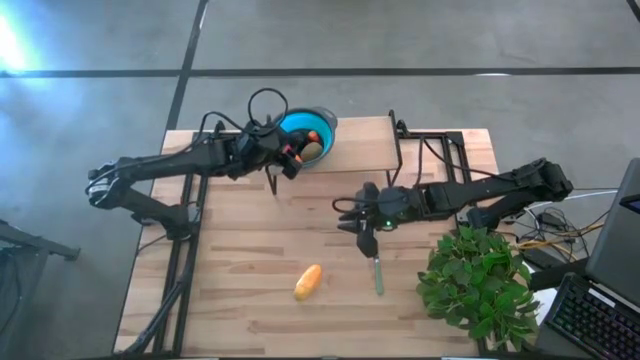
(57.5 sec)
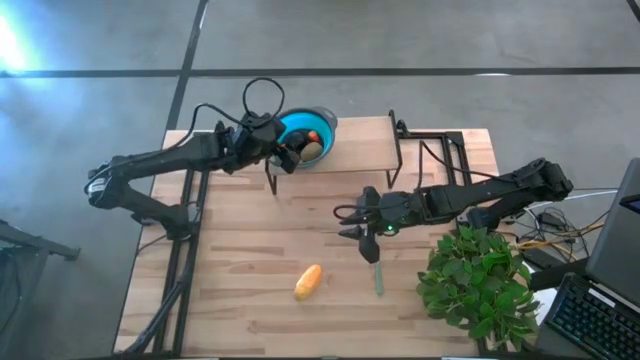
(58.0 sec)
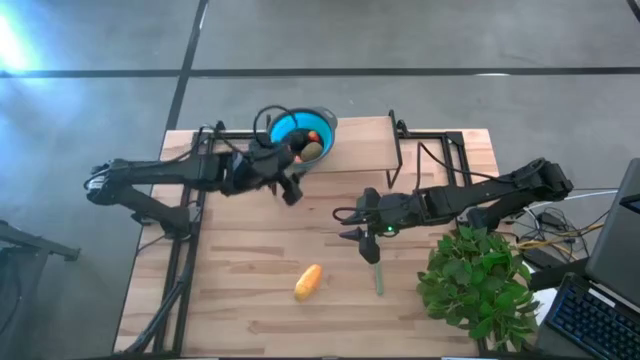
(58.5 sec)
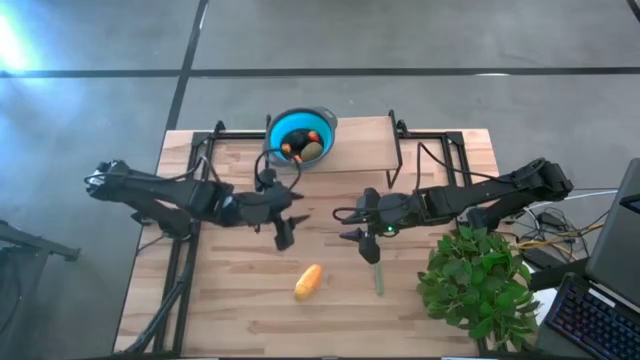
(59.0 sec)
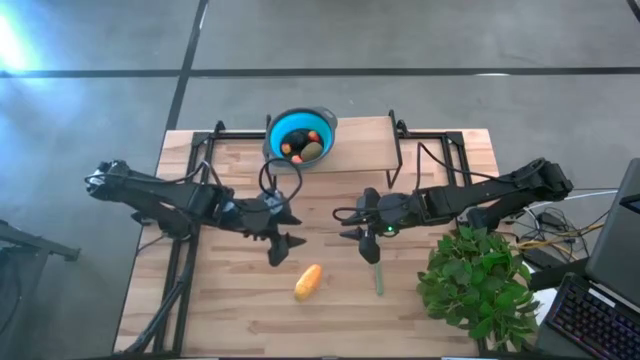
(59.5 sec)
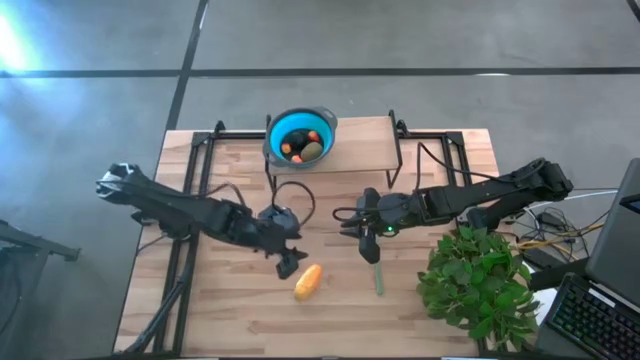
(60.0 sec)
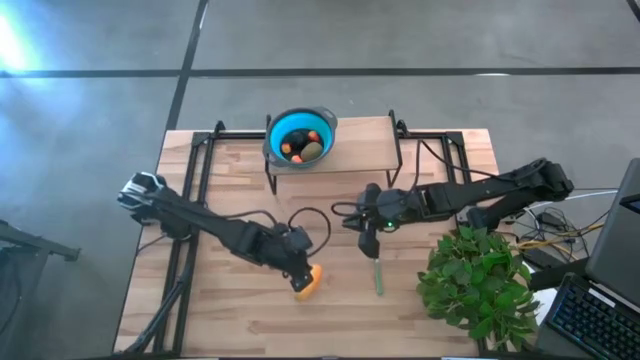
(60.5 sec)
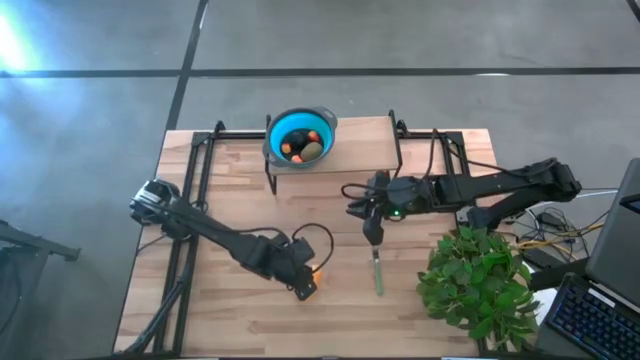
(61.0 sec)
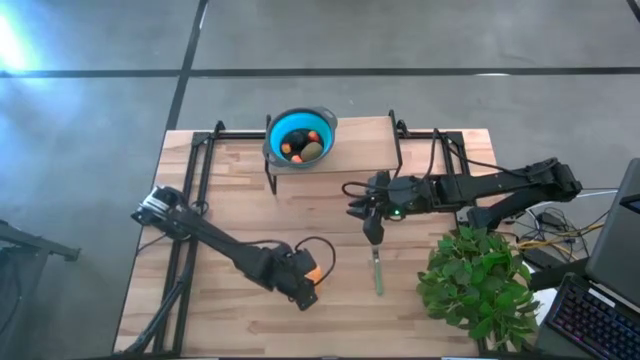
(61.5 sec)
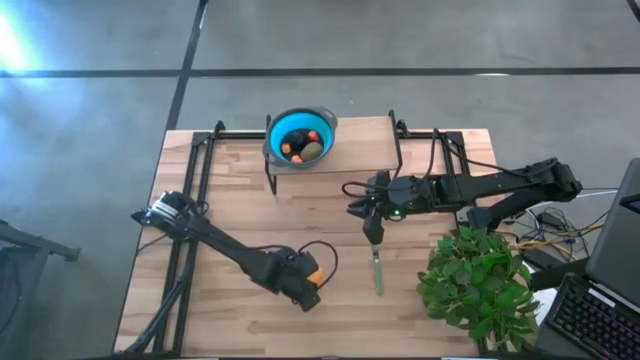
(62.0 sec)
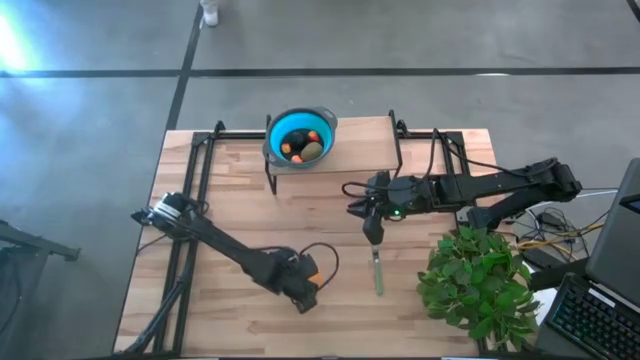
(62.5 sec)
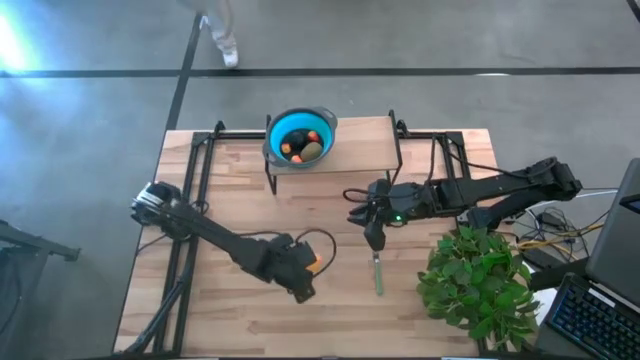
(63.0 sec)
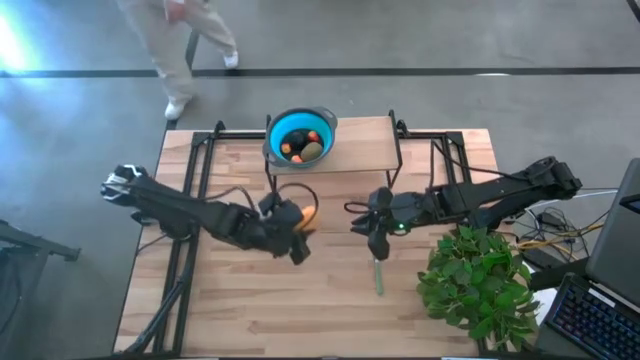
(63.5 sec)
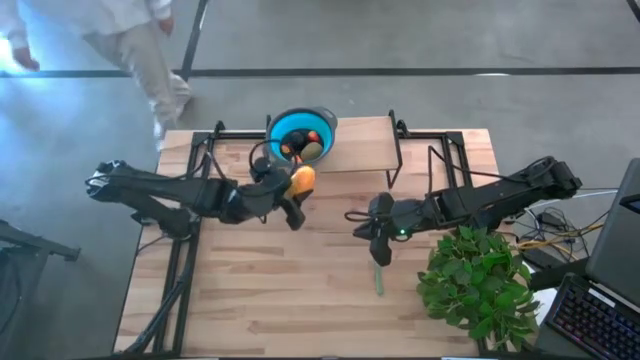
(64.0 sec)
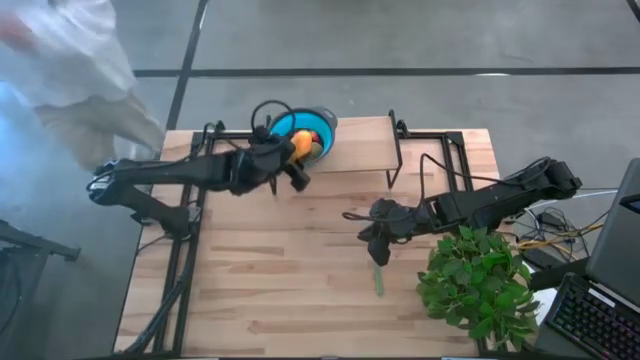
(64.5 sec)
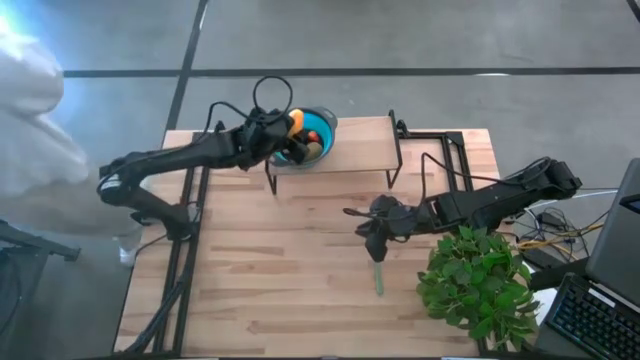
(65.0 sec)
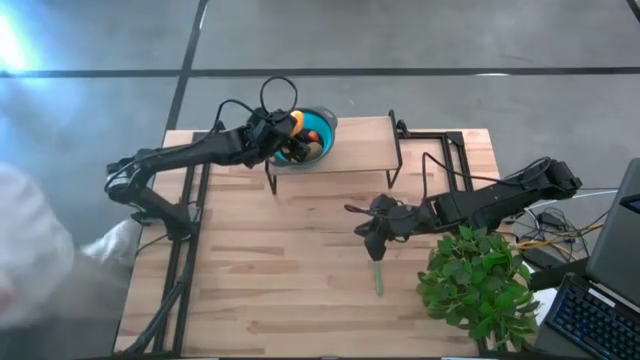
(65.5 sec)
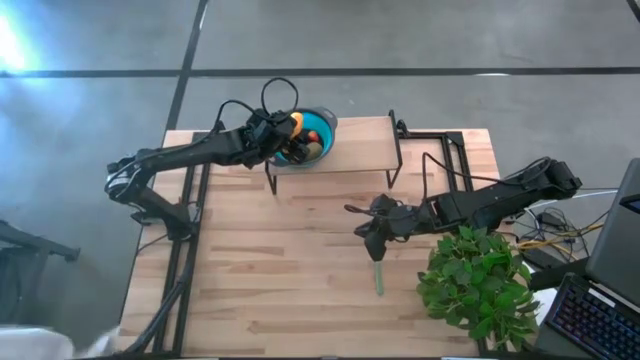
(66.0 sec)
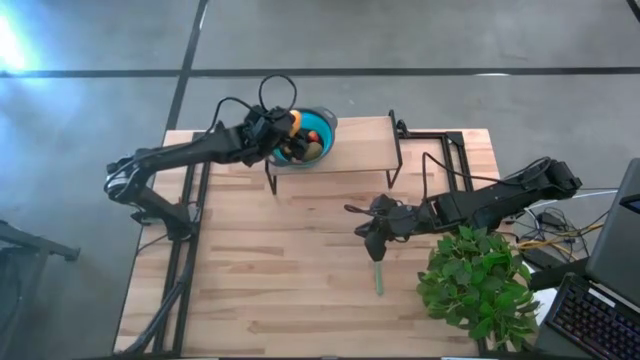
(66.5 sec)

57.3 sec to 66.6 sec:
Task: Pick & Place Fruit
Put the yellow mango in the blue strainer bowl on the shelf

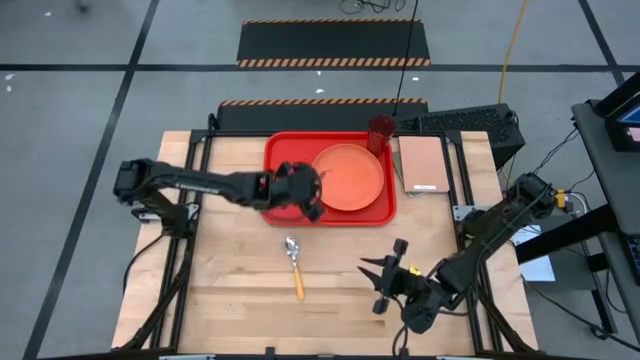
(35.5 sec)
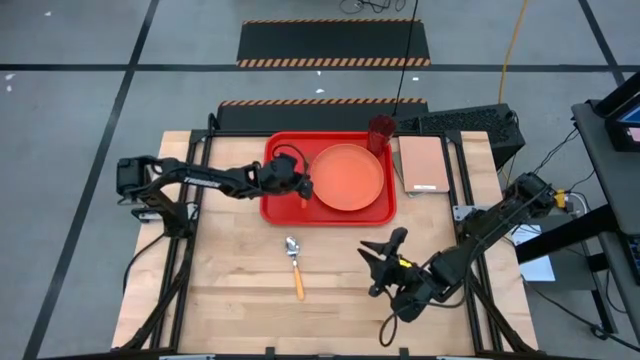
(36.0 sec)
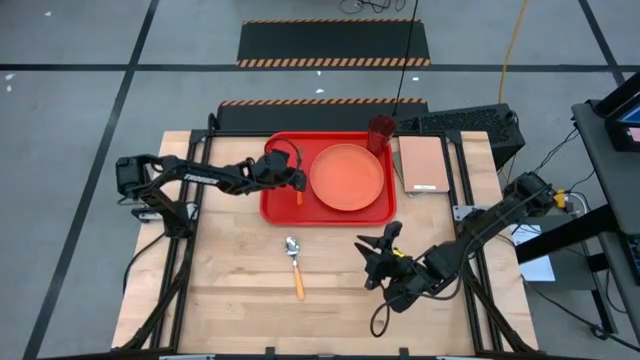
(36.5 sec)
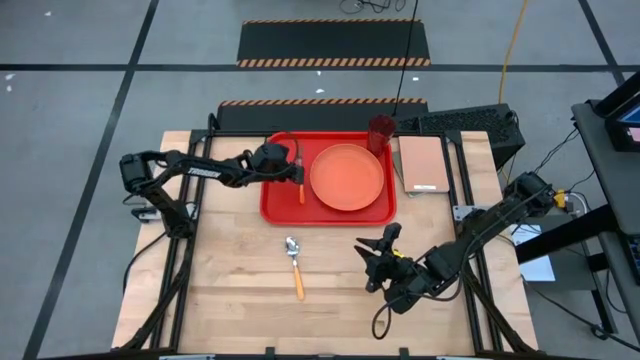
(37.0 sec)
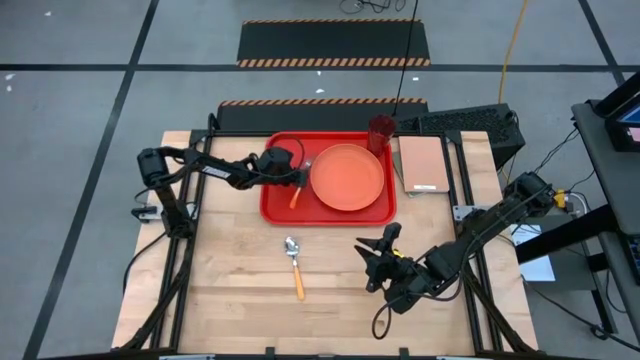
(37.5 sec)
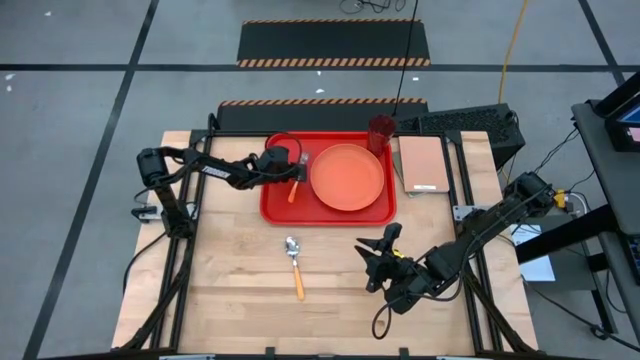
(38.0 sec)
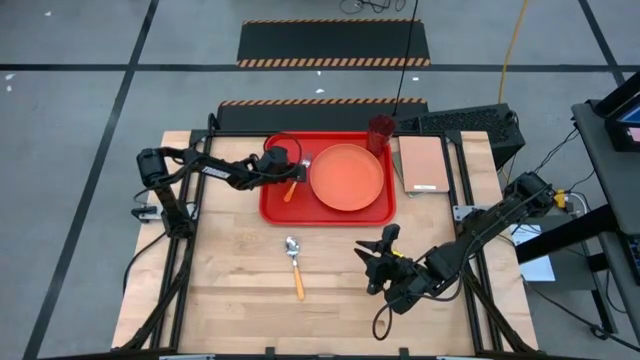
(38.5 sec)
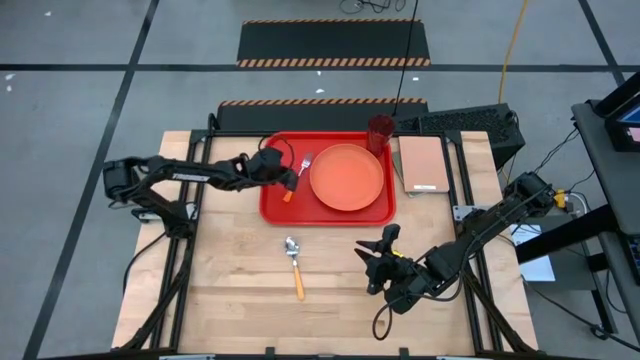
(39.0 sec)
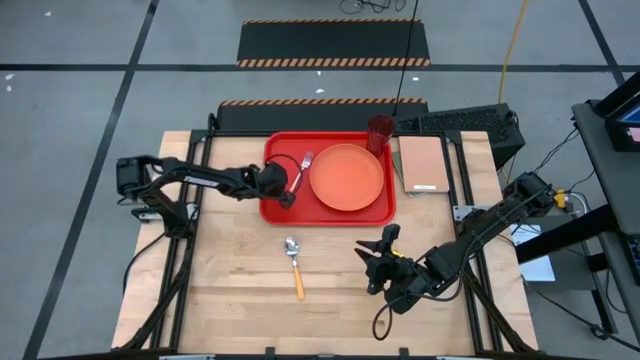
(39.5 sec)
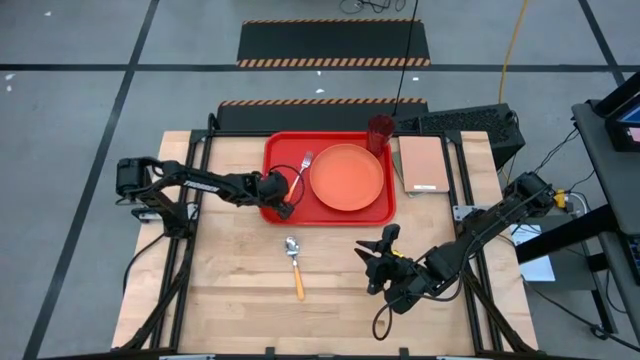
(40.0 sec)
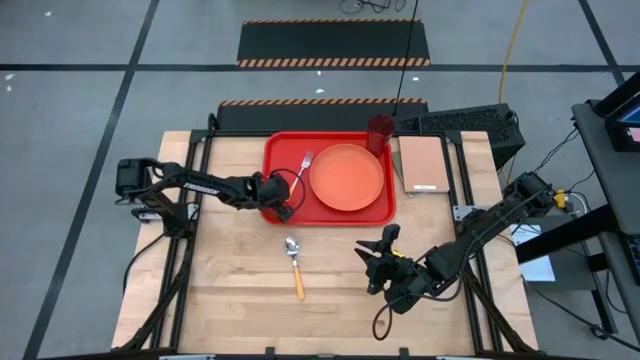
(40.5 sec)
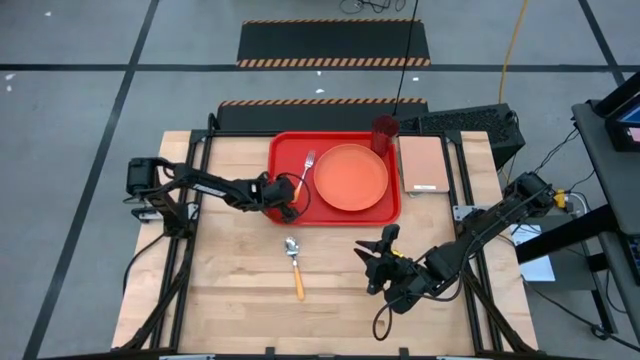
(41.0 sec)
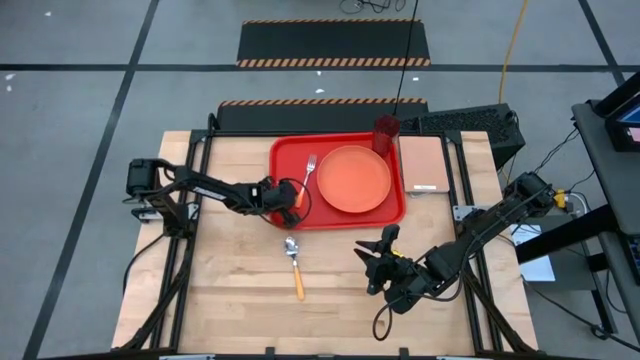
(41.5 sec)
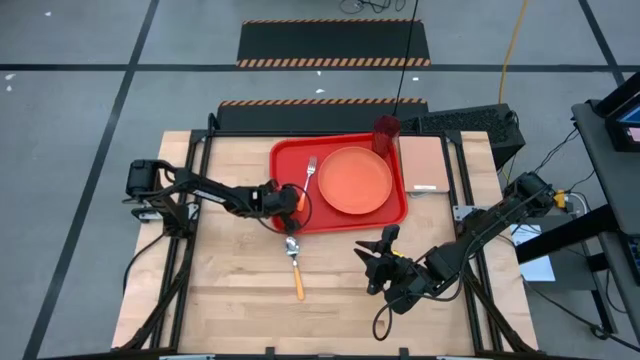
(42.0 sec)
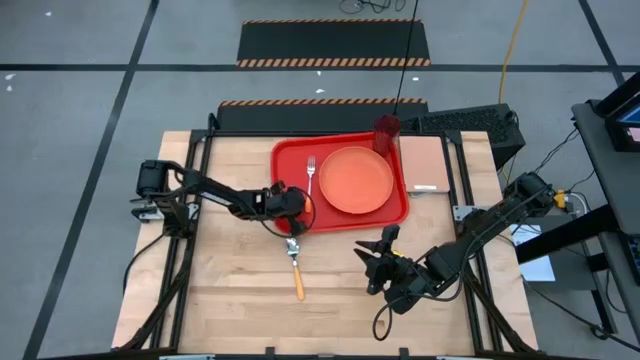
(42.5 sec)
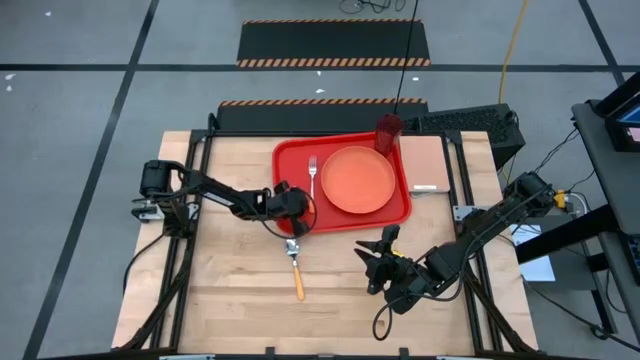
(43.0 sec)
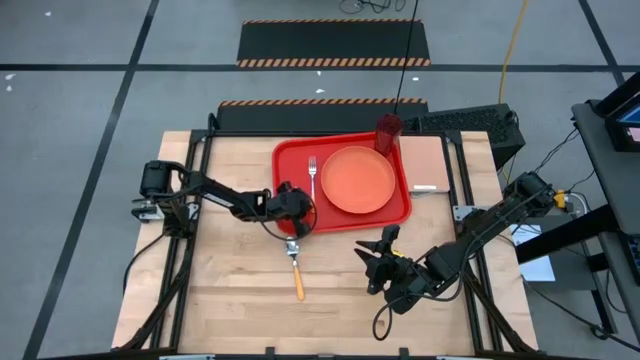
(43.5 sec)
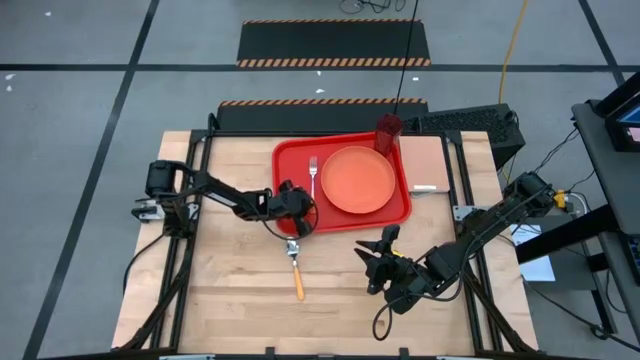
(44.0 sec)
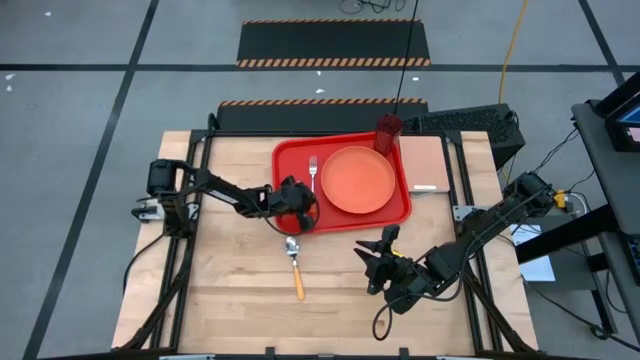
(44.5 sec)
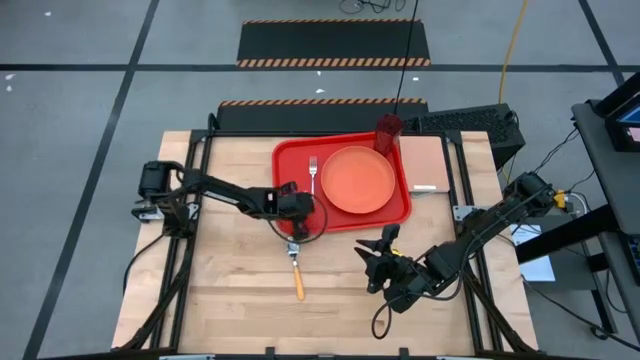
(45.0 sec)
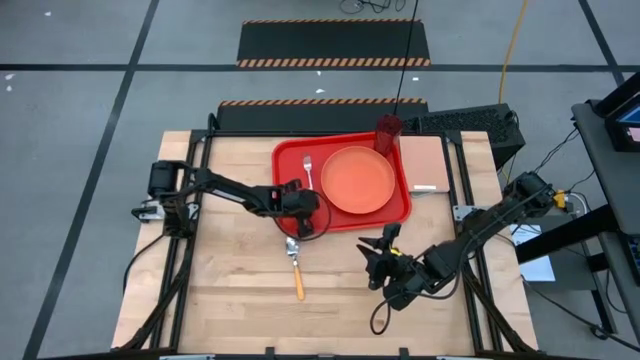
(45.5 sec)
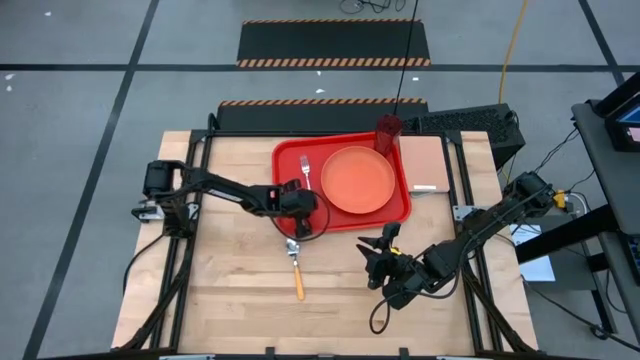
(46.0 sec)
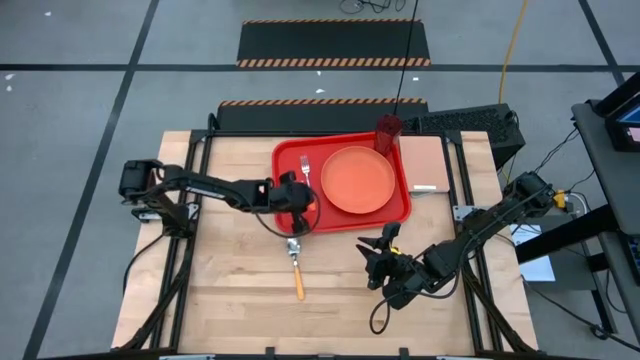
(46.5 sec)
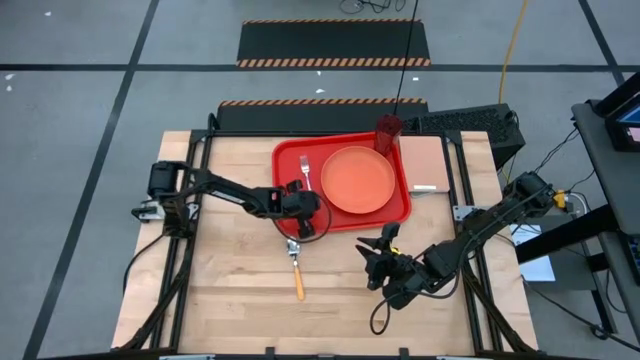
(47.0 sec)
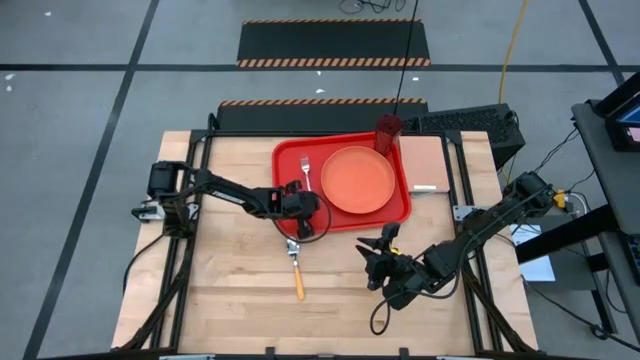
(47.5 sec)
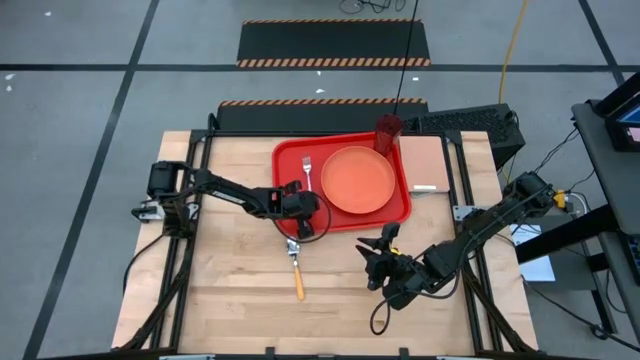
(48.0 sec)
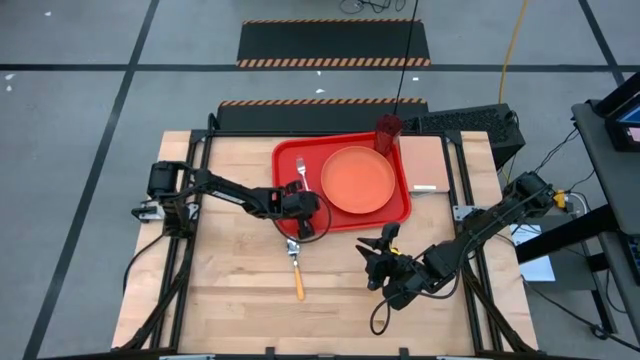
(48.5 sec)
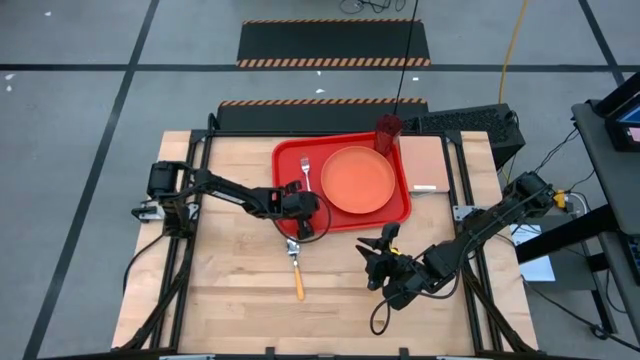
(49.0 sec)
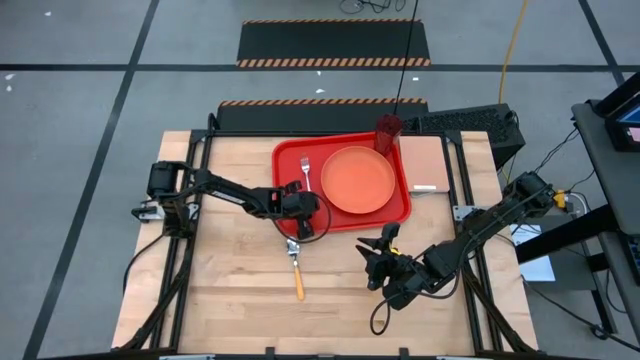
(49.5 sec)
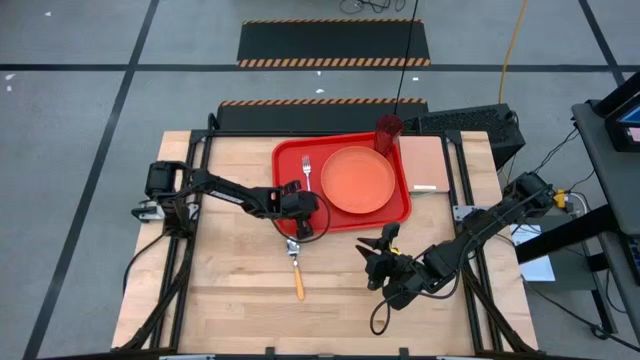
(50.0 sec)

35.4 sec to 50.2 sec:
Task: Pick and place plate/cup/fork/spoon on tray
Put the orange fork to the left side of the orange plate on the red serving tray
